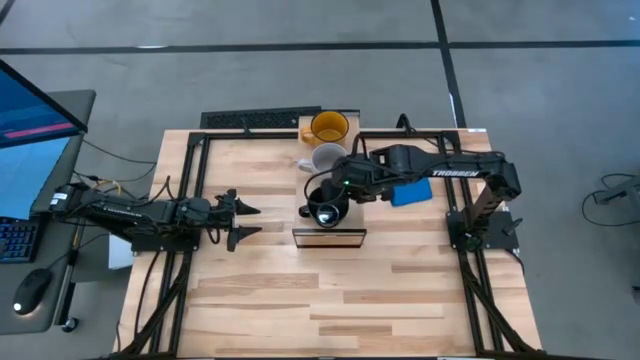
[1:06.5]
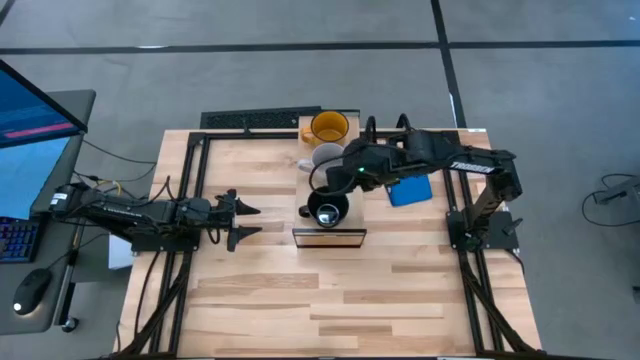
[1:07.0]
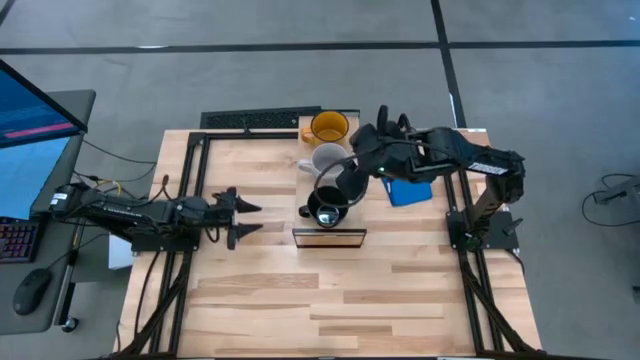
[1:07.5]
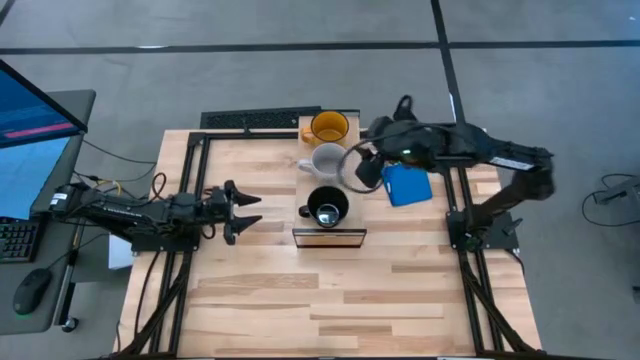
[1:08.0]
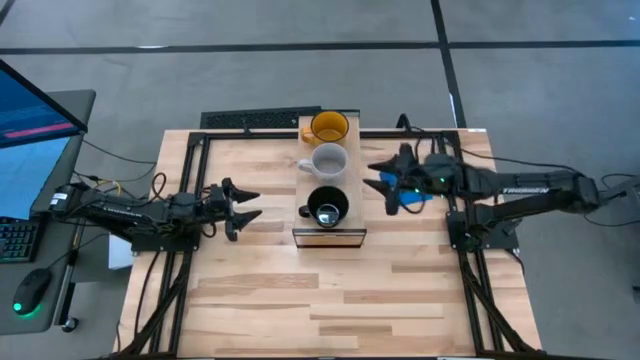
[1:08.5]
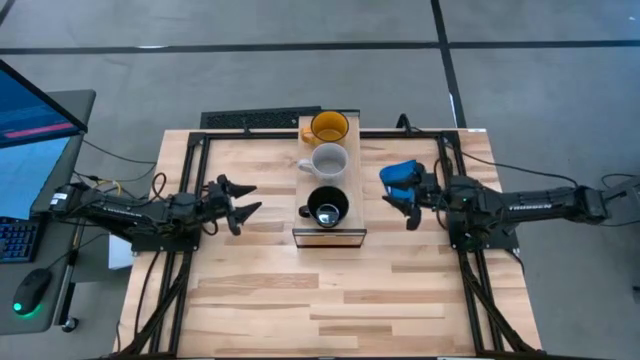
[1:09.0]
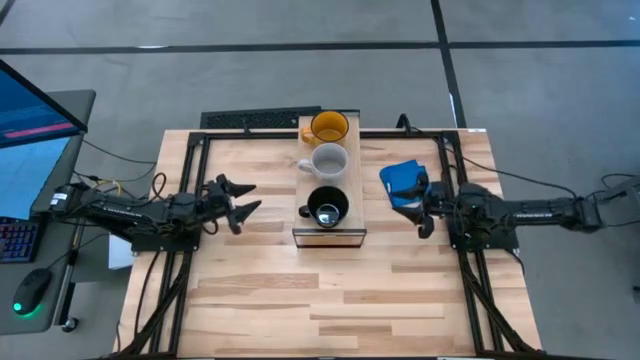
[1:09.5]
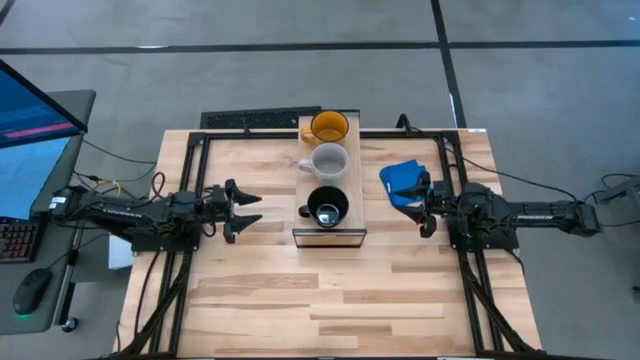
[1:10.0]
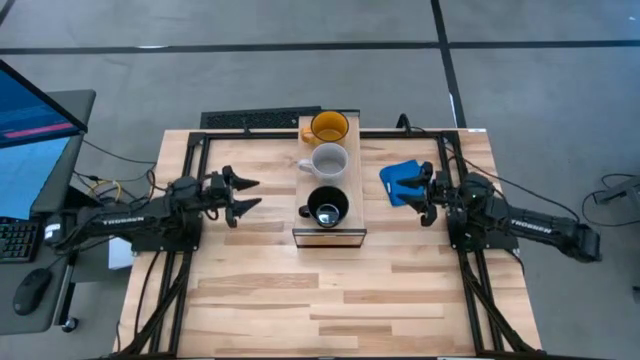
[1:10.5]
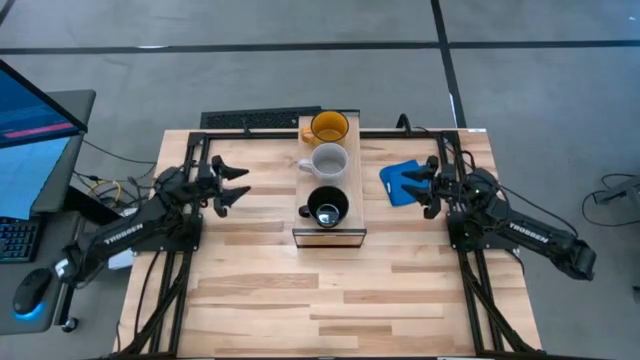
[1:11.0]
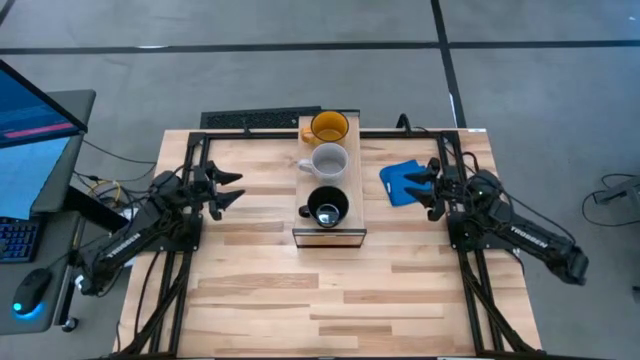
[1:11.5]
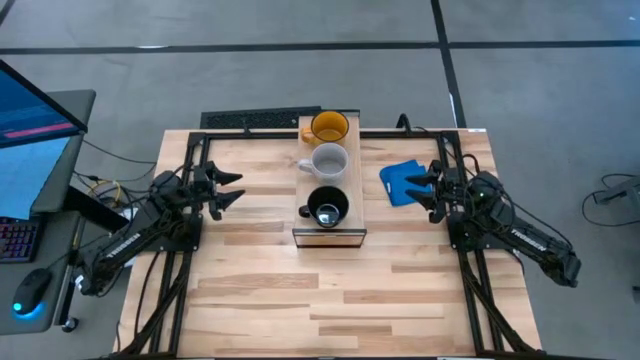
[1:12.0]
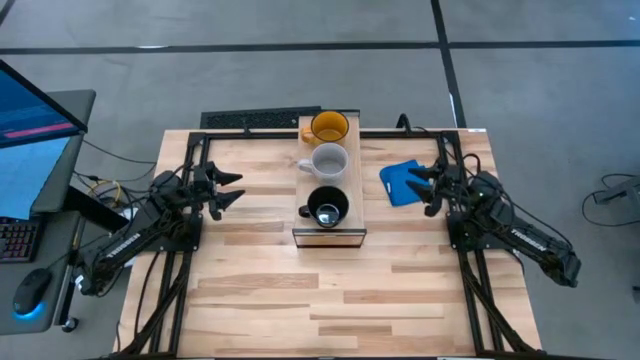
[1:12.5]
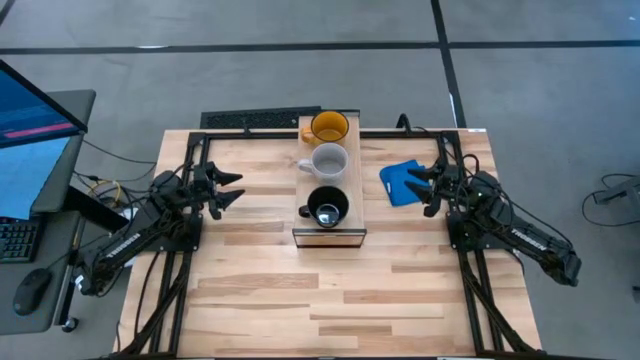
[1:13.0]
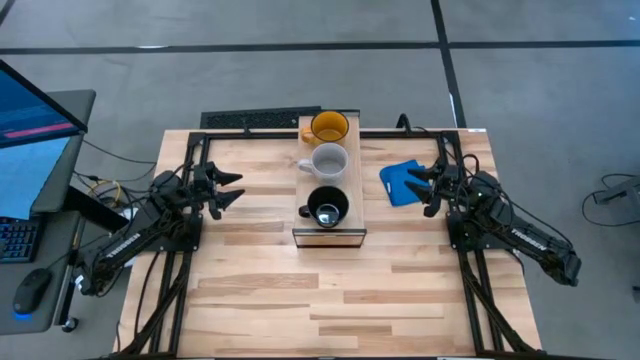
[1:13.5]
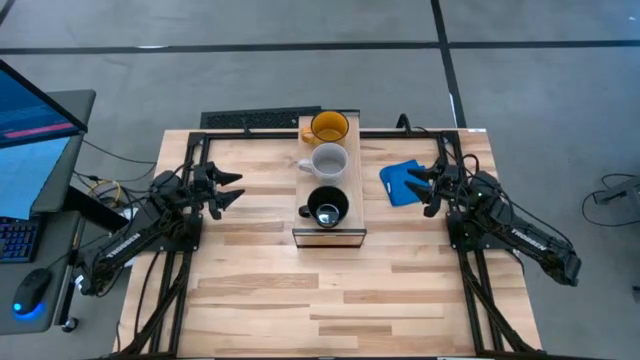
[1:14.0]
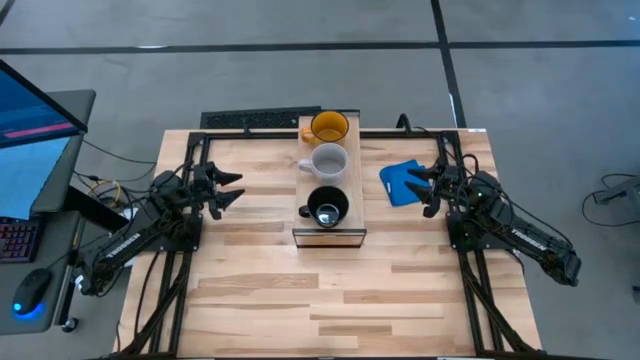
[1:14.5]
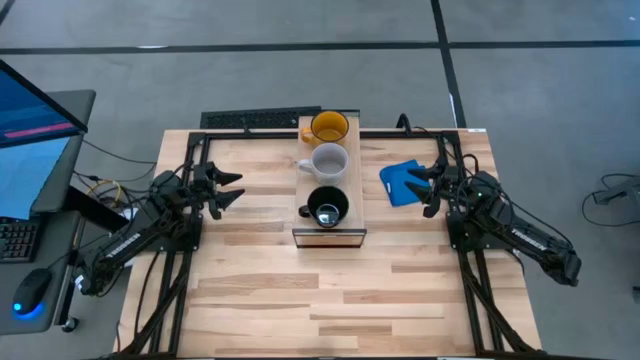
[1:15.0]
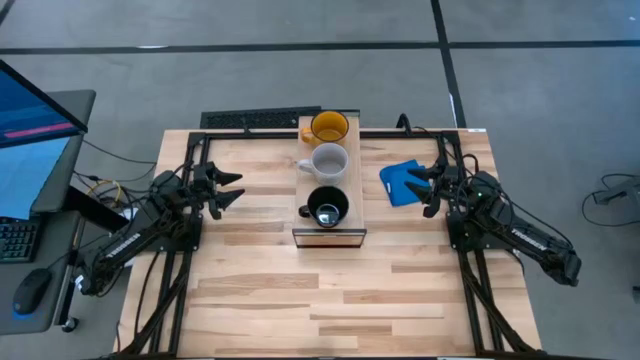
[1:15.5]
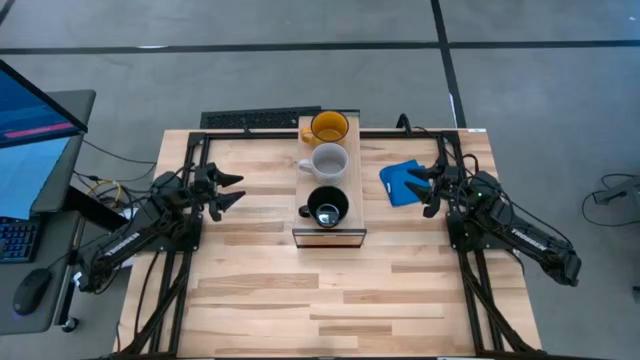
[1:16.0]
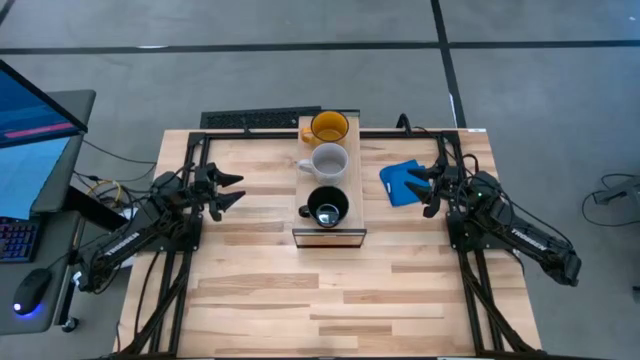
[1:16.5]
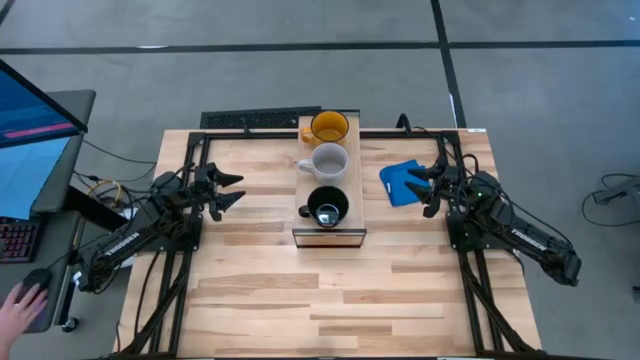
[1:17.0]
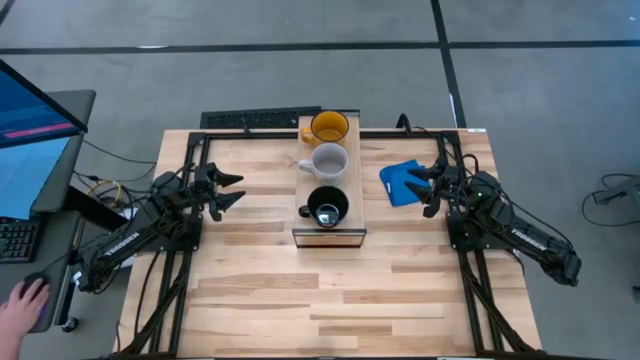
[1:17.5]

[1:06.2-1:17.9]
Task: Stack small to large cups/mugs on shelf
Return to Home Position

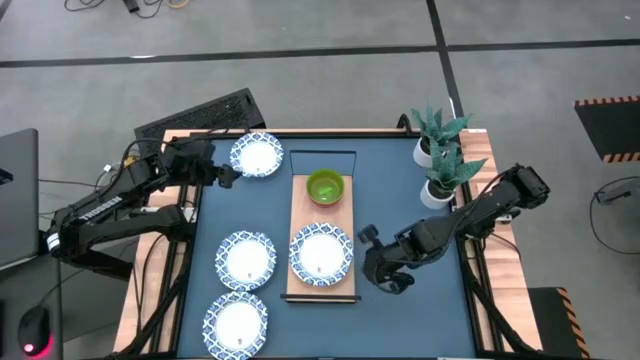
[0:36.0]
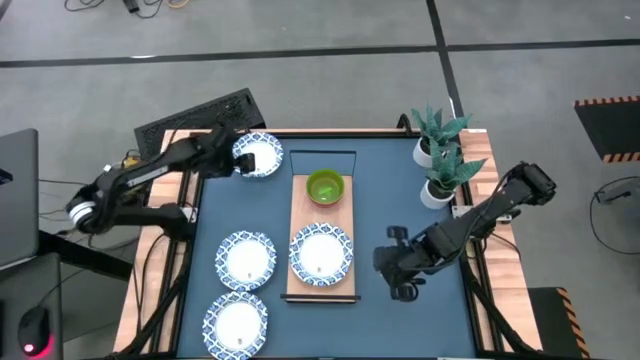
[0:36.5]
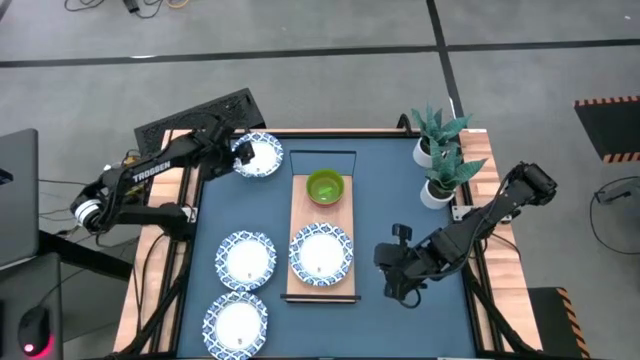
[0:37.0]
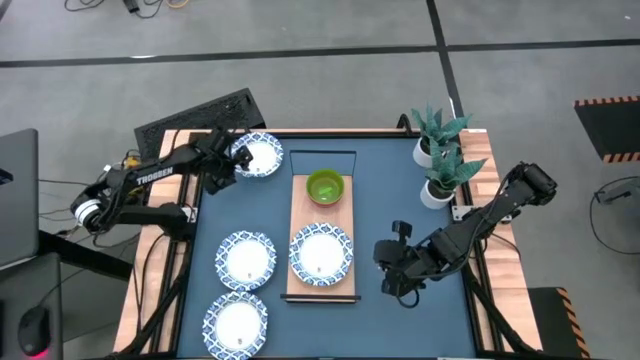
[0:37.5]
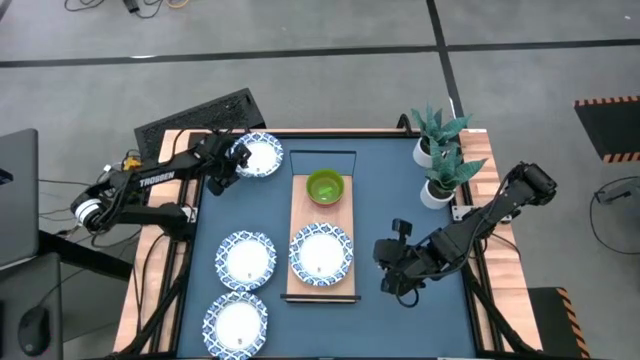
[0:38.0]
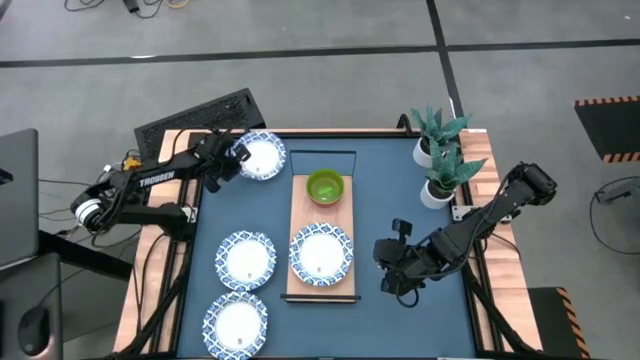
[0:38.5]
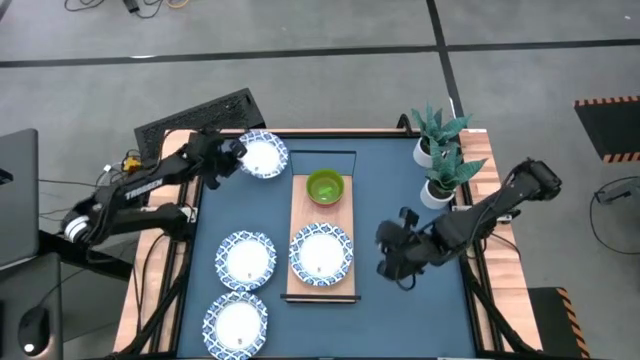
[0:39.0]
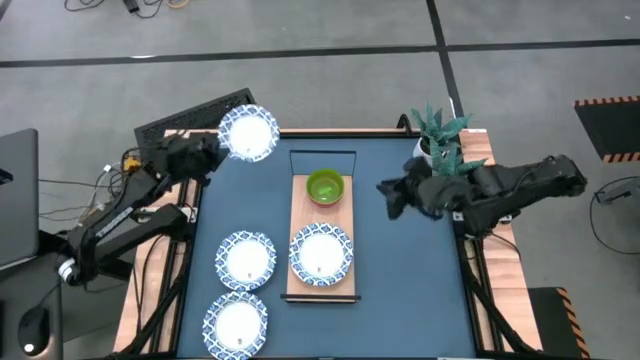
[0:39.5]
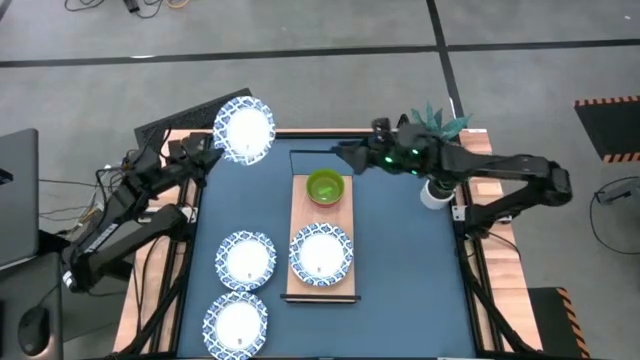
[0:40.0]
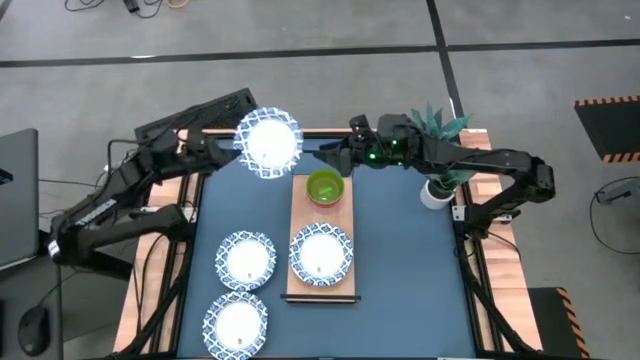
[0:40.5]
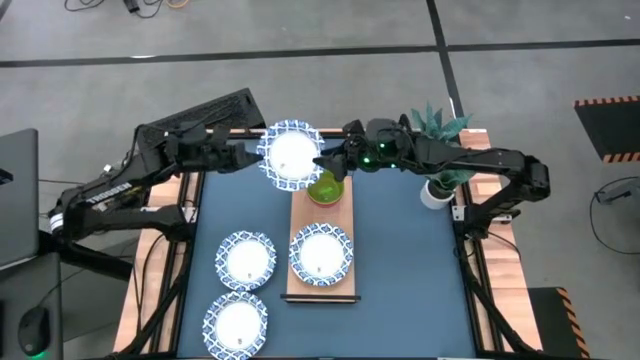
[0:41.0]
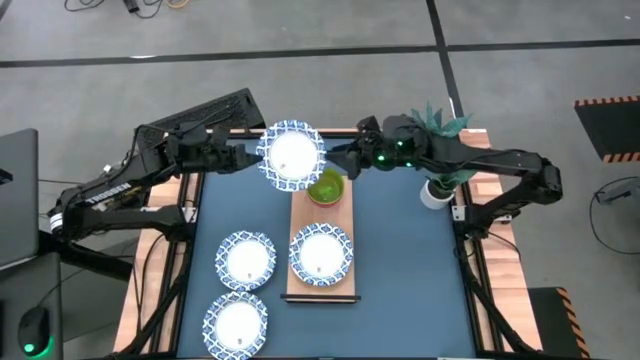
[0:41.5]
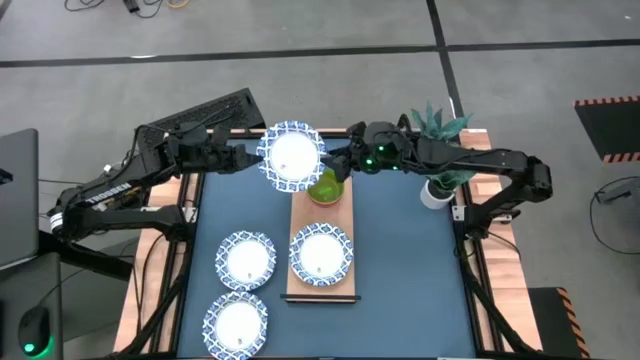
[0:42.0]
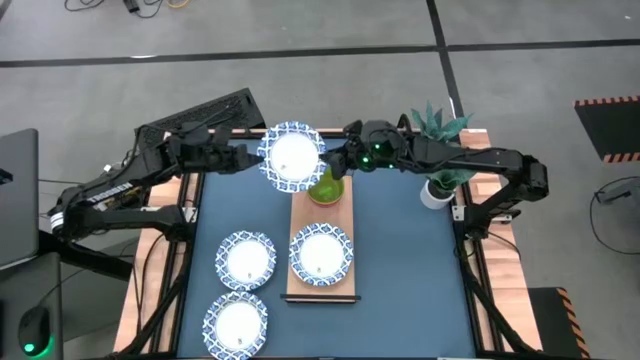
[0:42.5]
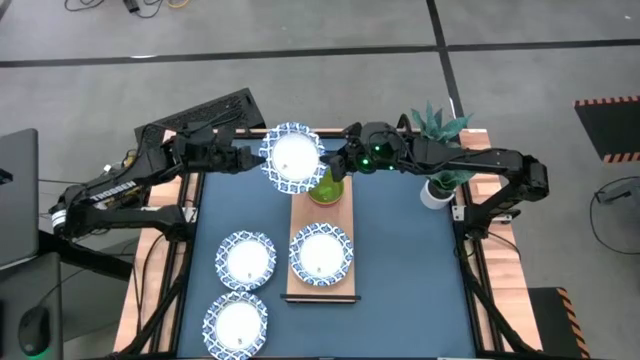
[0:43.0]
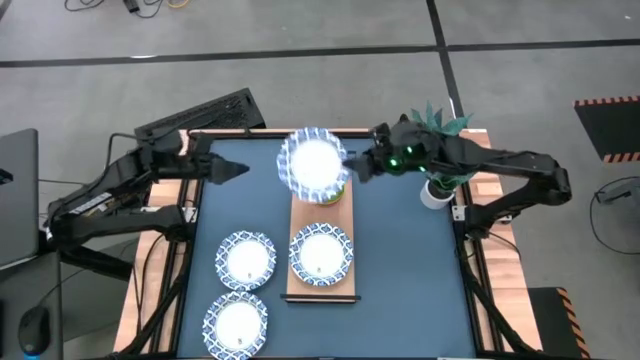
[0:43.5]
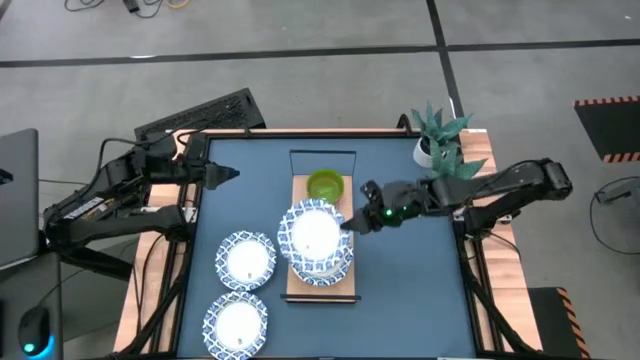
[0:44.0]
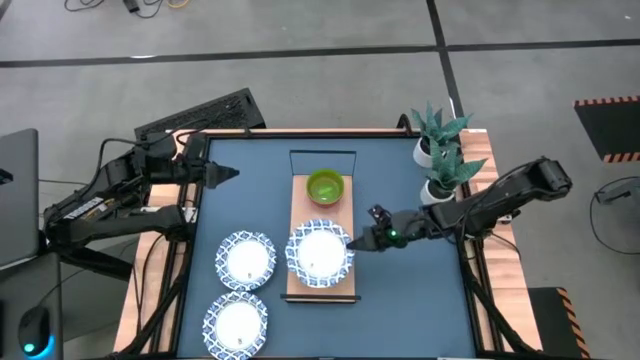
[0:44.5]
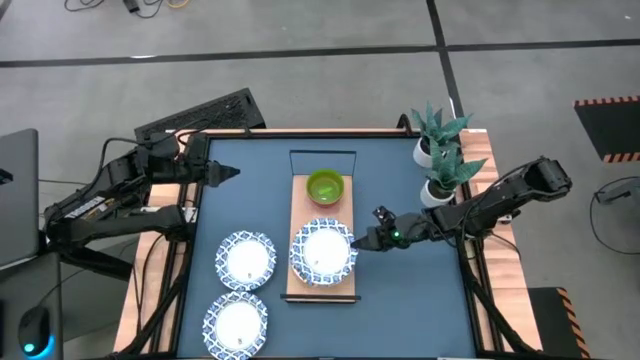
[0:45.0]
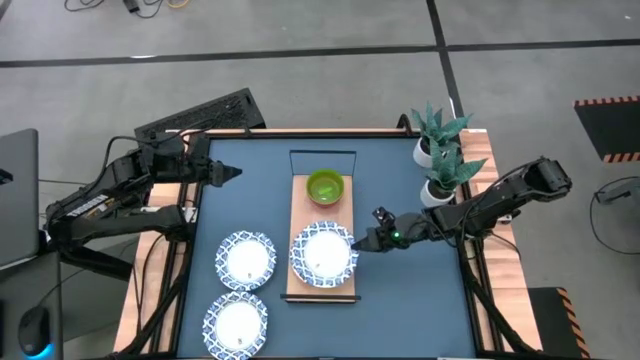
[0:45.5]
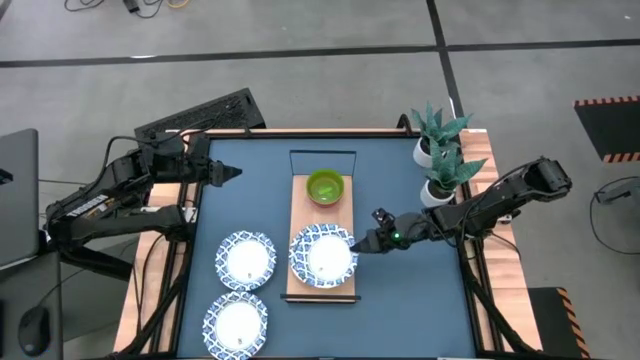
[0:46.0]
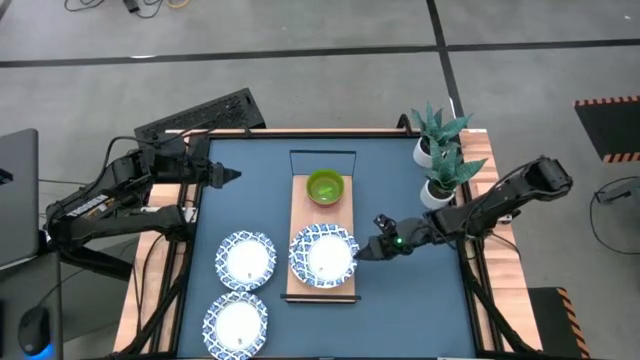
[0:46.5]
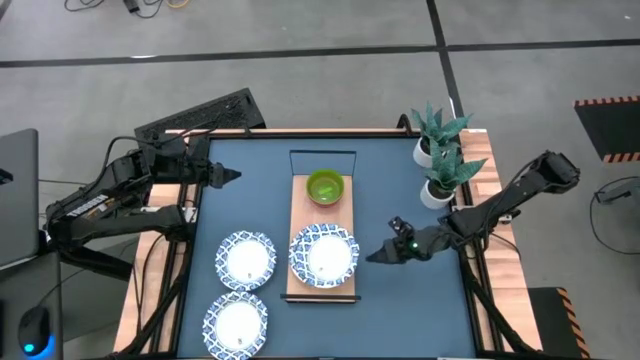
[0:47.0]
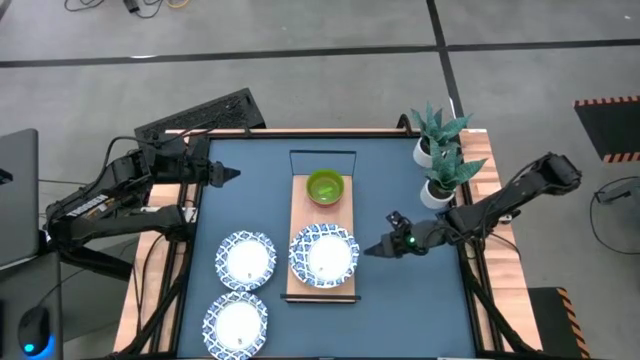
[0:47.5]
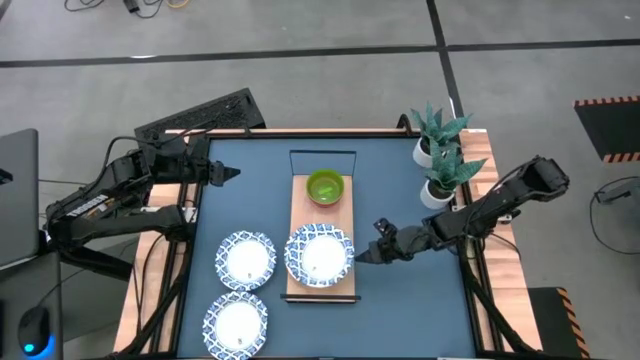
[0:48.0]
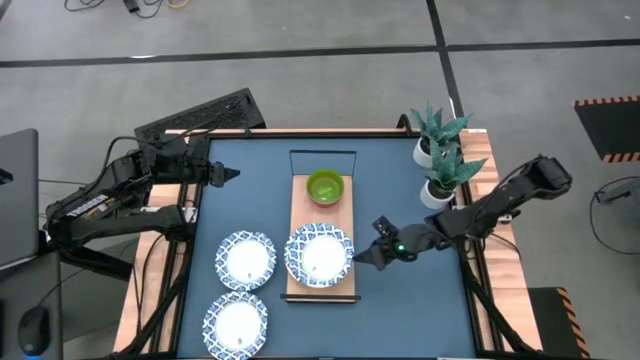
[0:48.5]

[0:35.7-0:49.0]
Task: Place and stack bowls onto a shelf
Stack the white patterned plate on top of the other white patterned plate on the shelf
